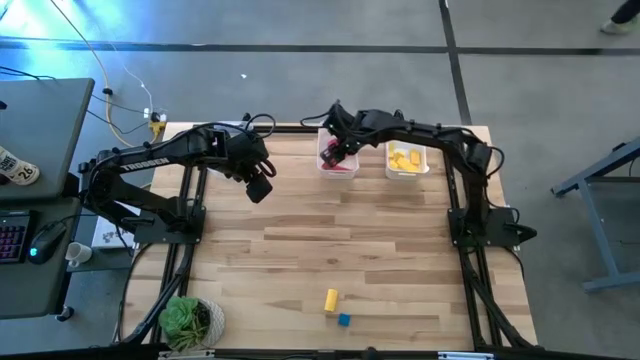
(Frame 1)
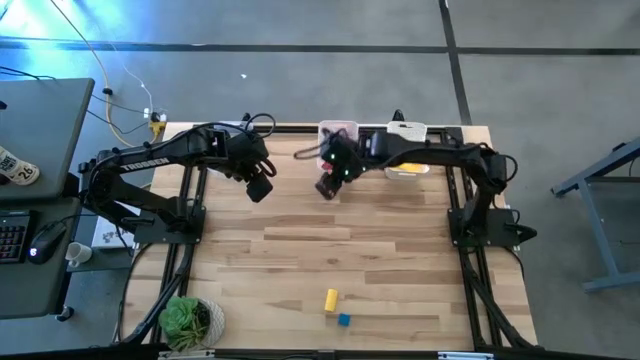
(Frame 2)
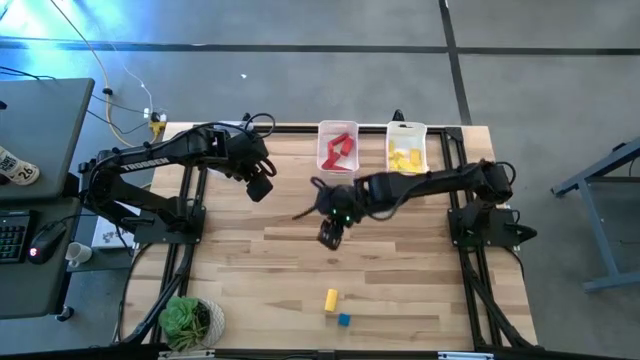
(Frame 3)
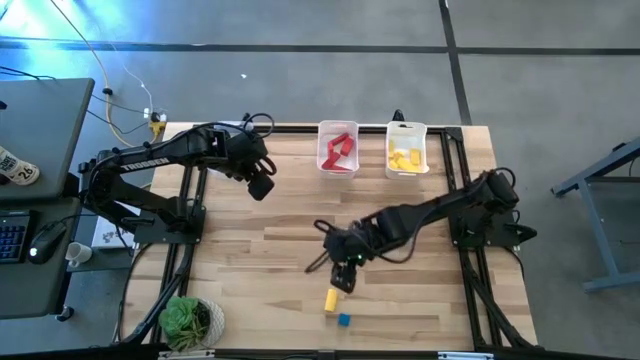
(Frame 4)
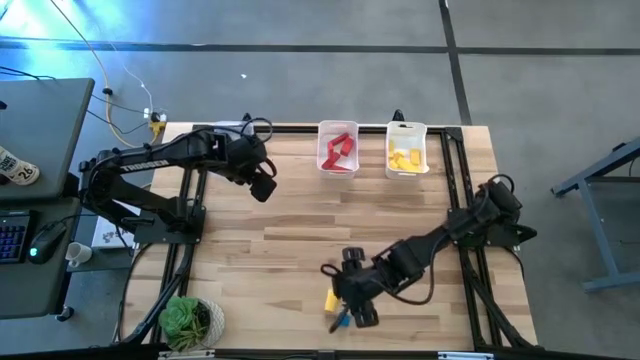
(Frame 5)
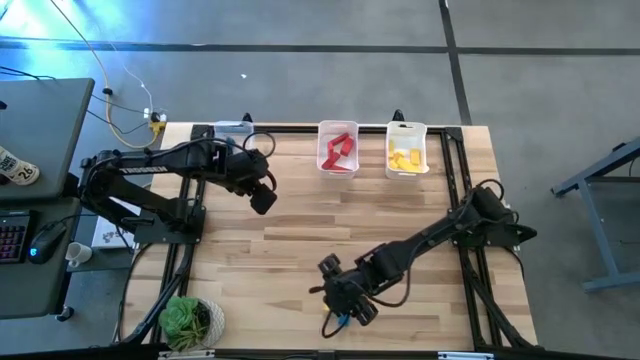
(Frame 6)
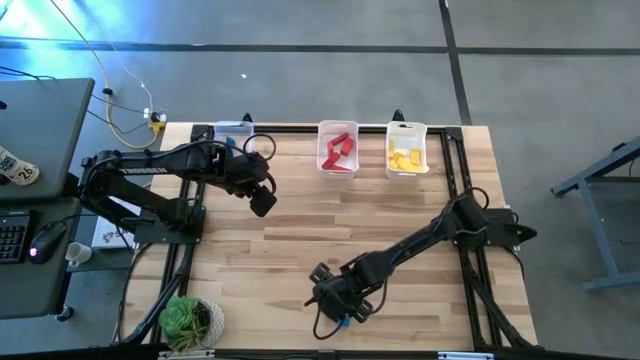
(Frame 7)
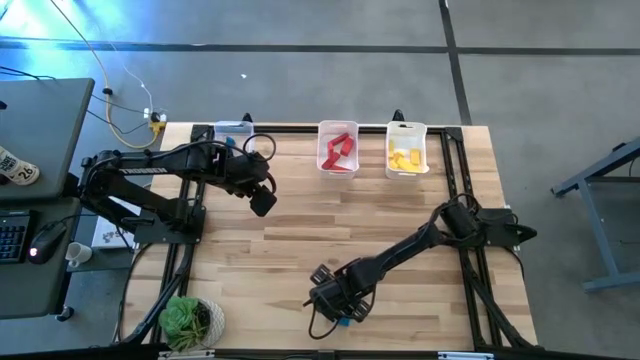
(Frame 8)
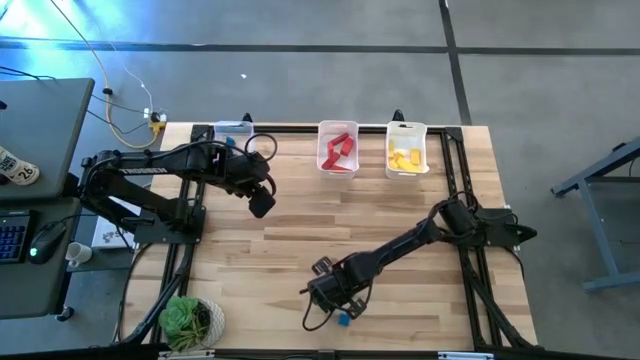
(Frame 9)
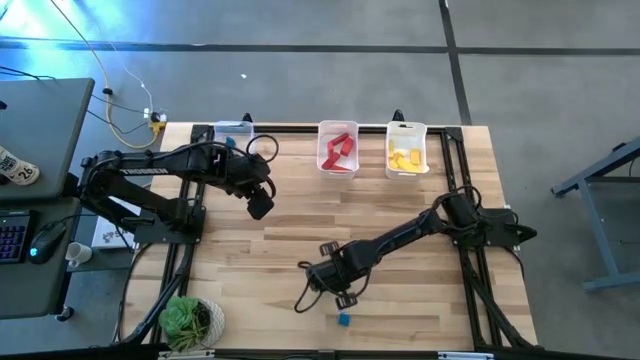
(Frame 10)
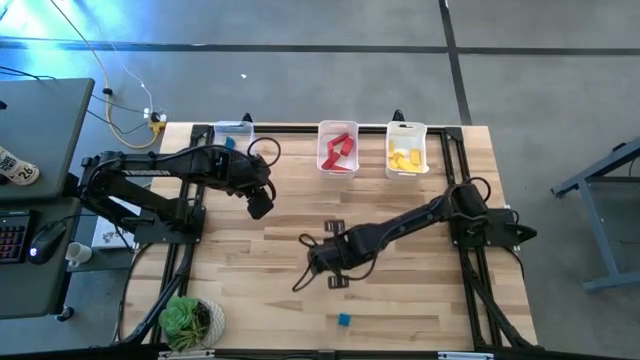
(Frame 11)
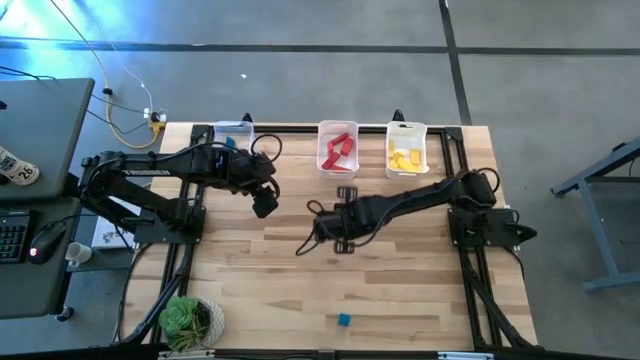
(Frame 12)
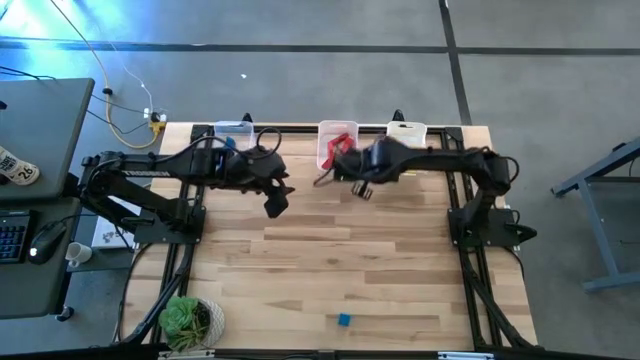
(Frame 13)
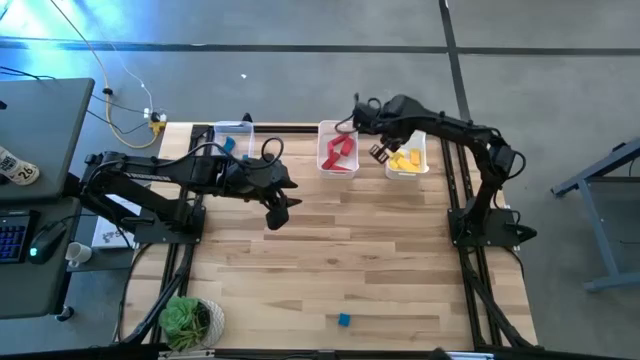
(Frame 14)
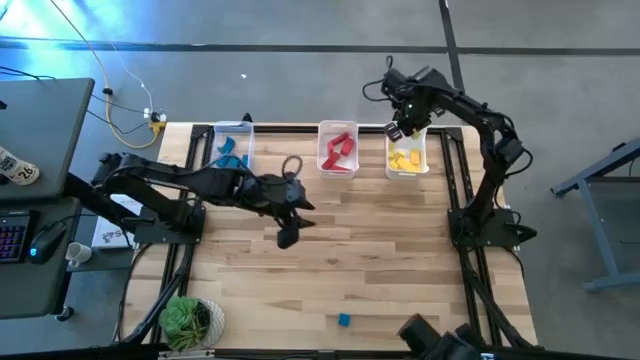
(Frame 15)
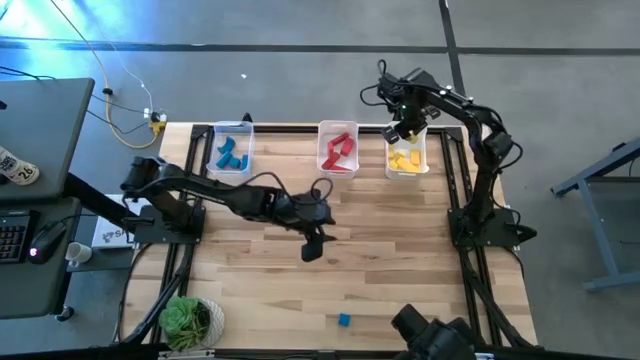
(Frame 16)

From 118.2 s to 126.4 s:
Task: Sort & place blocks by color
Put the yellow block into the right white bin

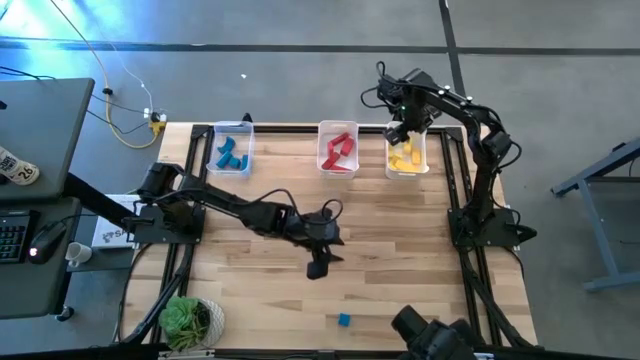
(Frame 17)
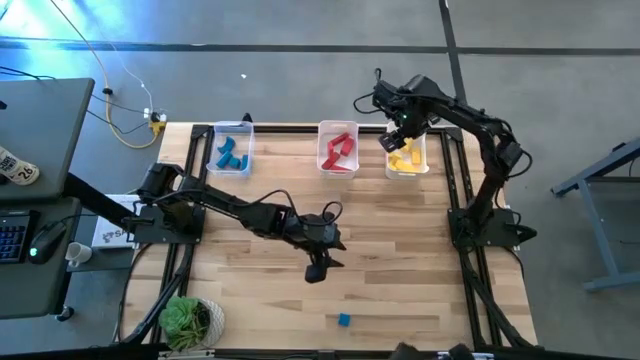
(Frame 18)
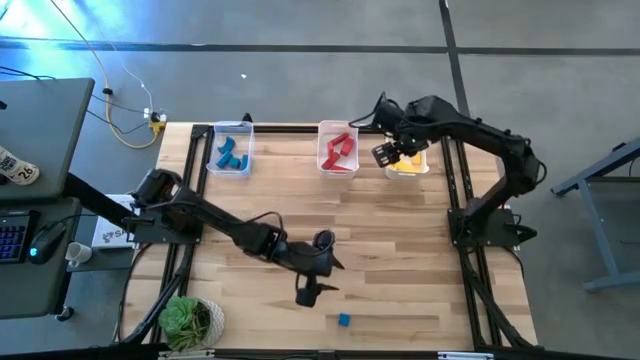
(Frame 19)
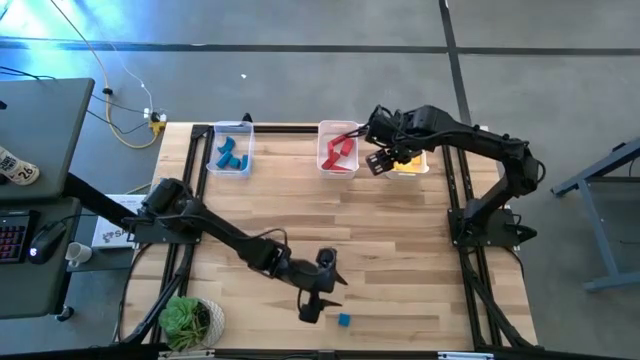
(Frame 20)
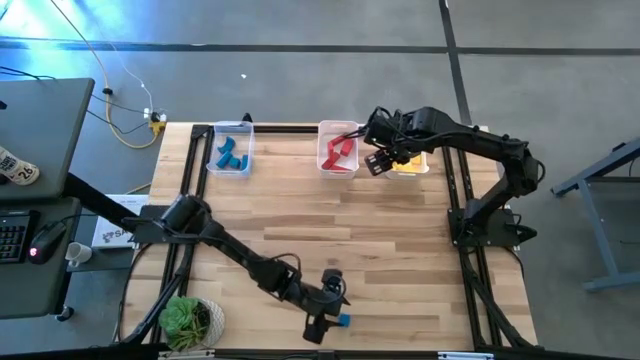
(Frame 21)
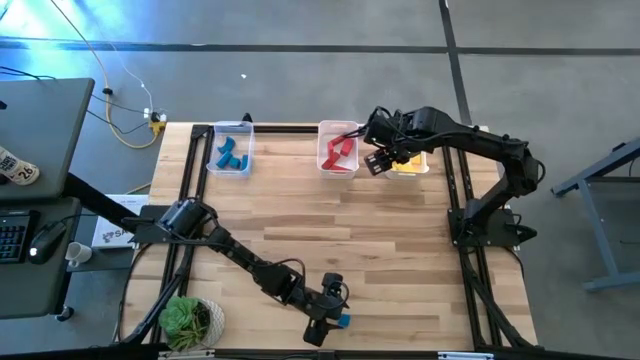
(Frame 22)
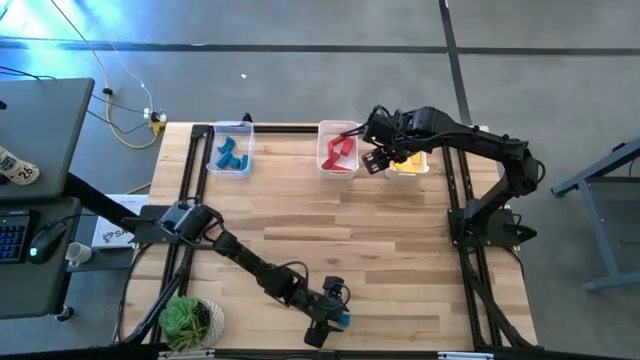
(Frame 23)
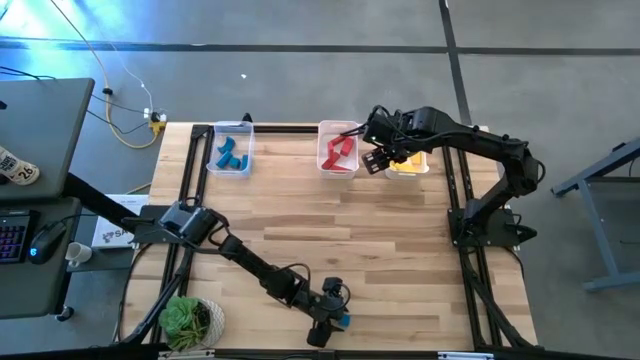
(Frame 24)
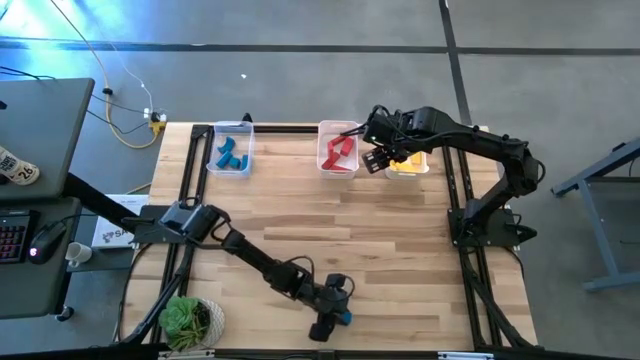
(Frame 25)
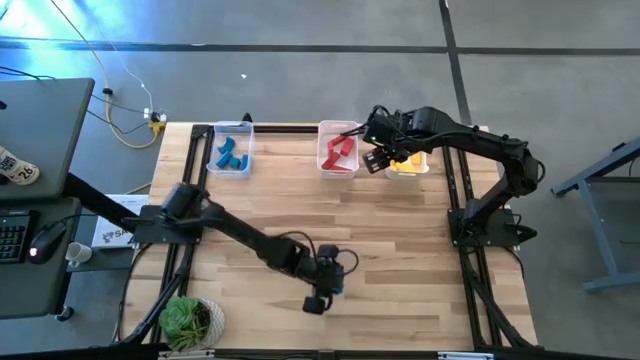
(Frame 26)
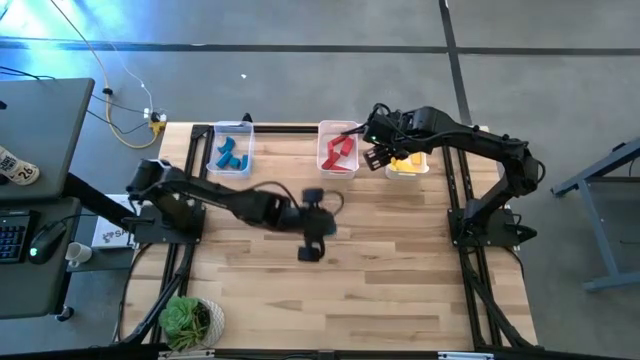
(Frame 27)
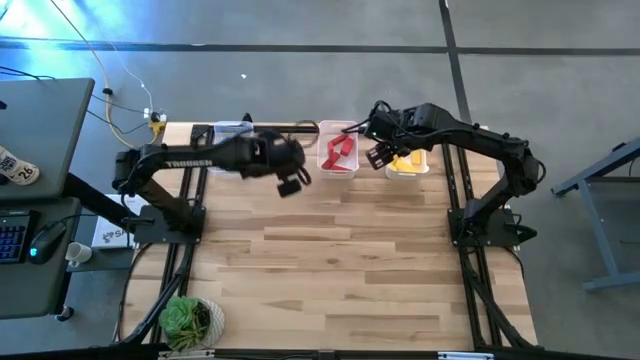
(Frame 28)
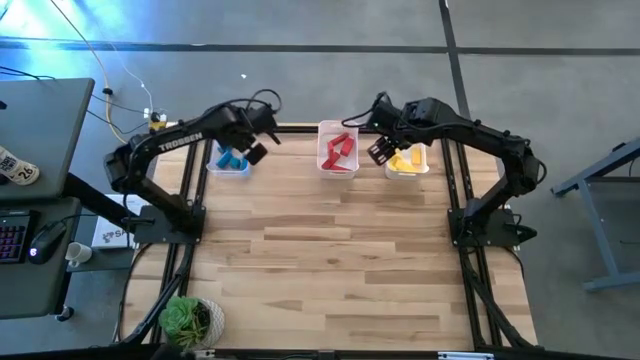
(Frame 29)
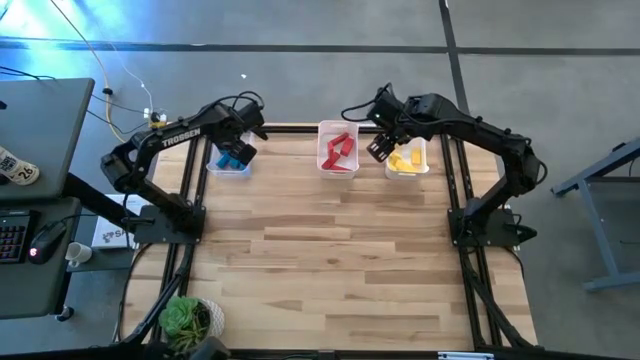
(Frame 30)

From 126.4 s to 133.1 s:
Put the blue block into the transparent bin

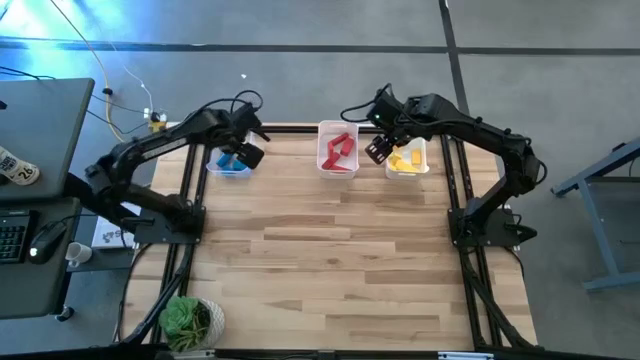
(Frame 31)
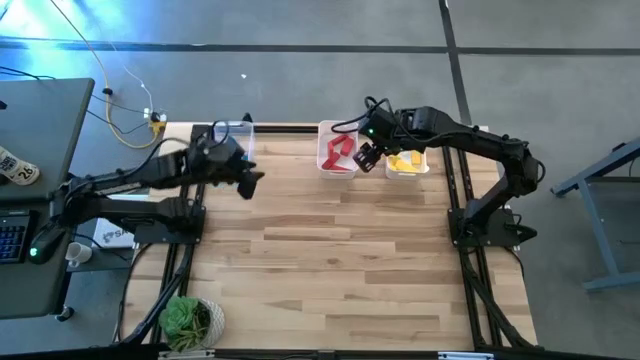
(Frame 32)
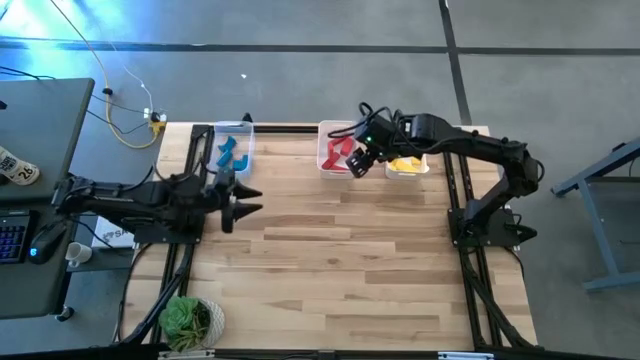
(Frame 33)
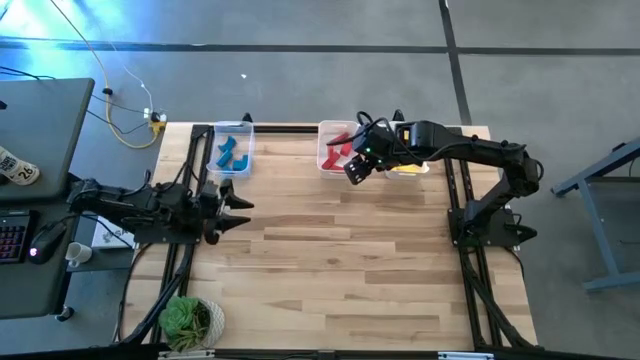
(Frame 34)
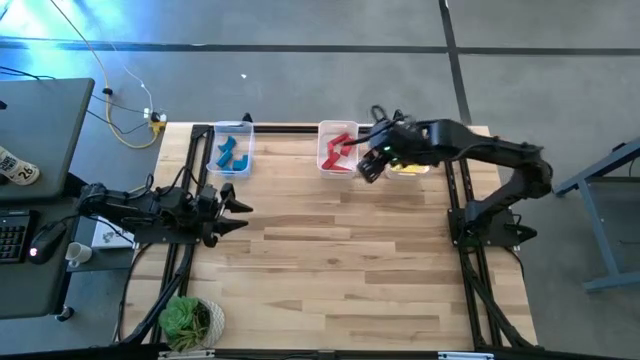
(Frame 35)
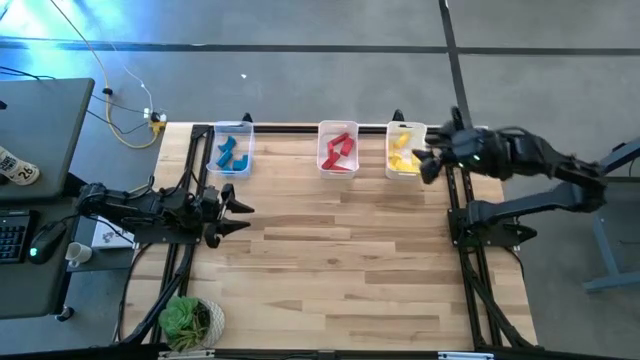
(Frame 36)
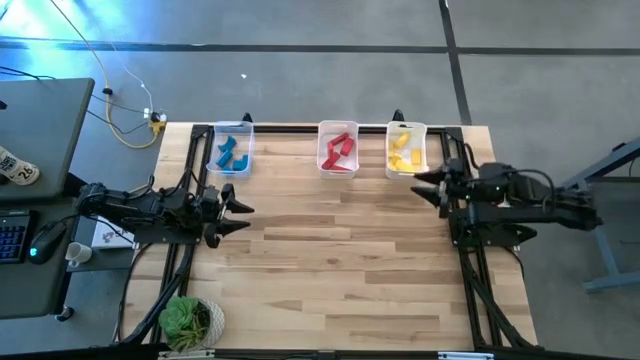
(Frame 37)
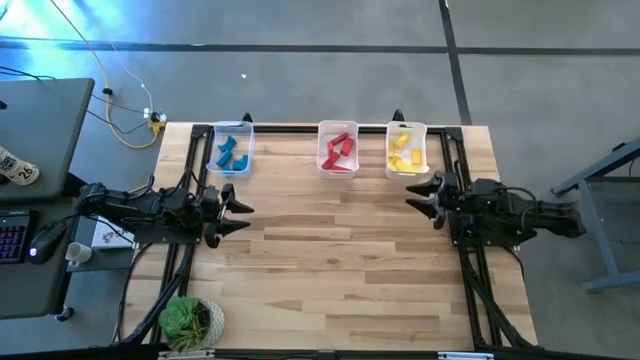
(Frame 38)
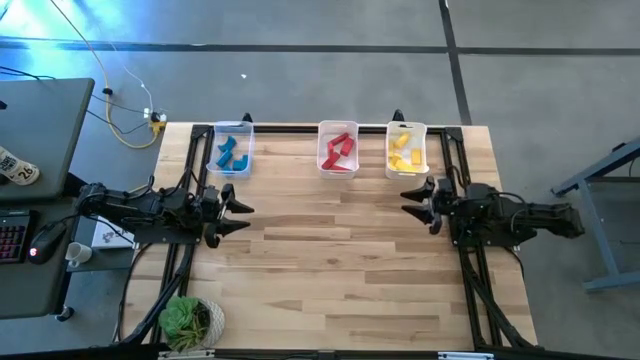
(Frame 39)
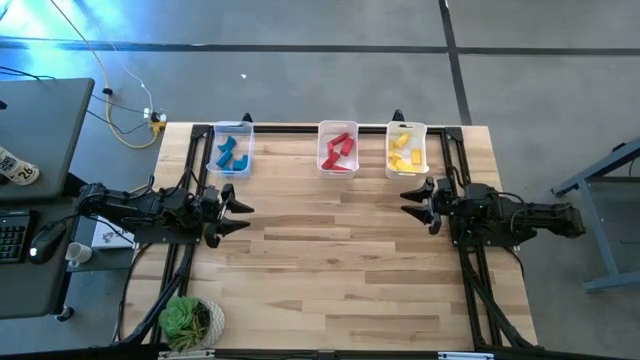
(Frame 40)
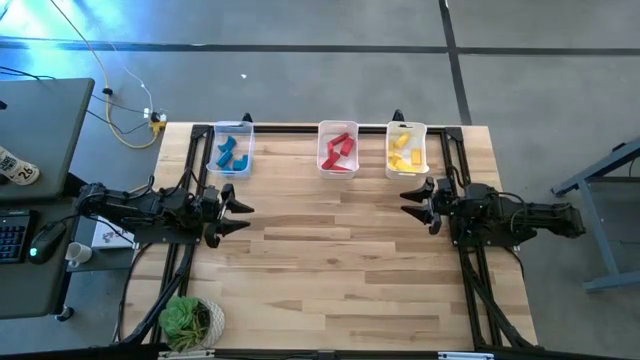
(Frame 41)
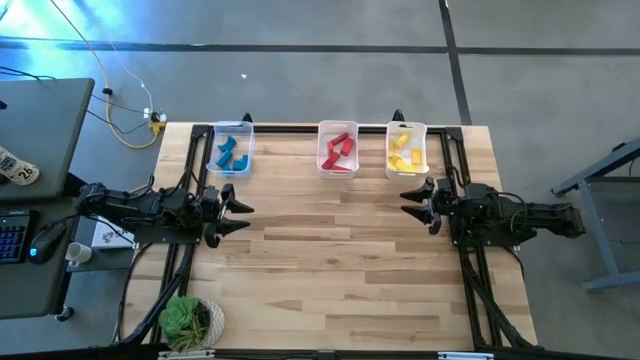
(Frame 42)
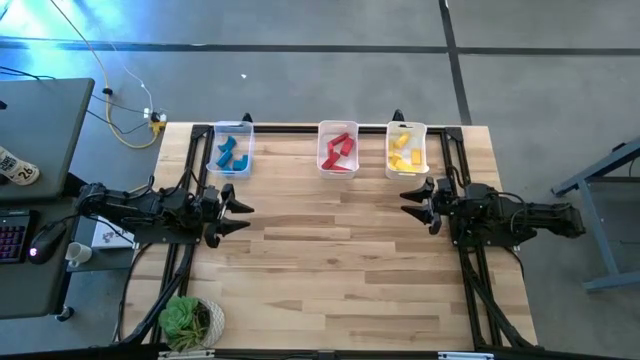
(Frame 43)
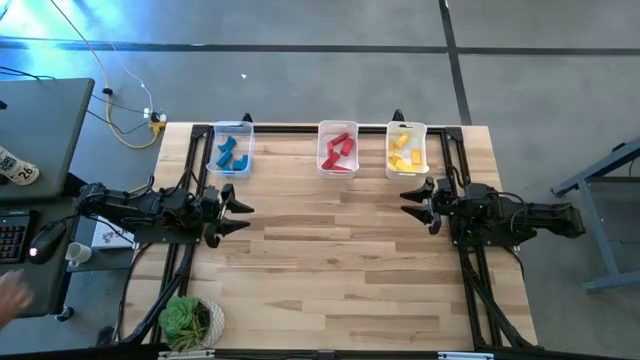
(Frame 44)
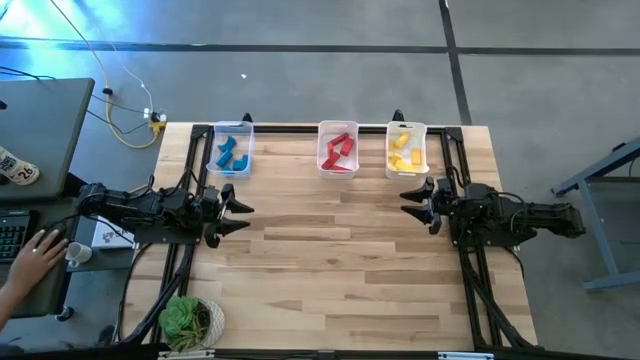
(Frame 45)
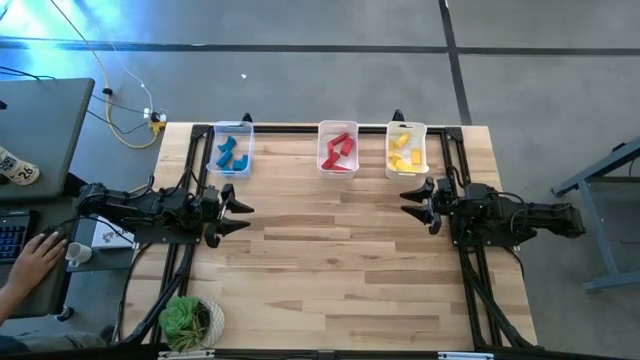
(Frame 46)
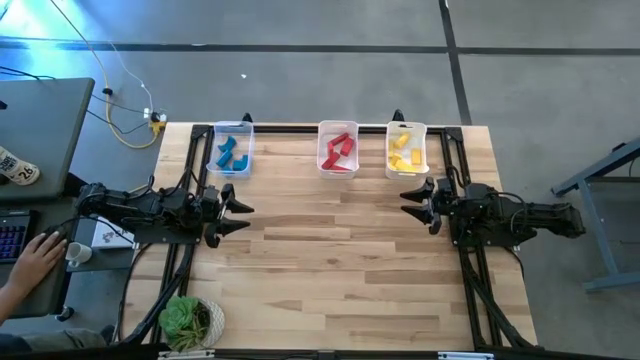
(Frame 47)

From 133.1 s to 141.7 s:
Return to Home Position
